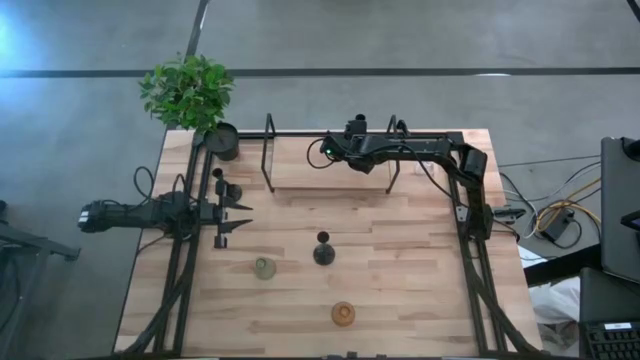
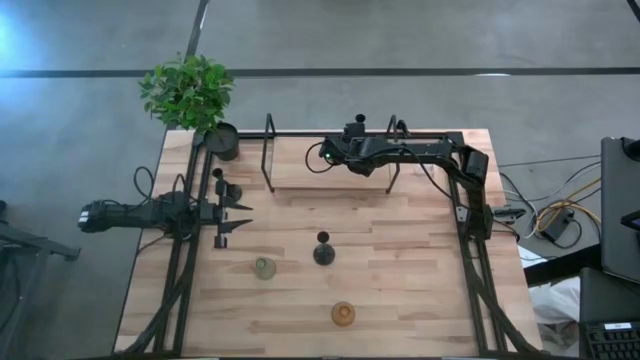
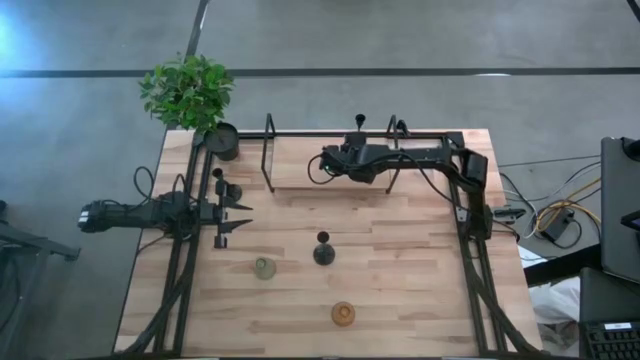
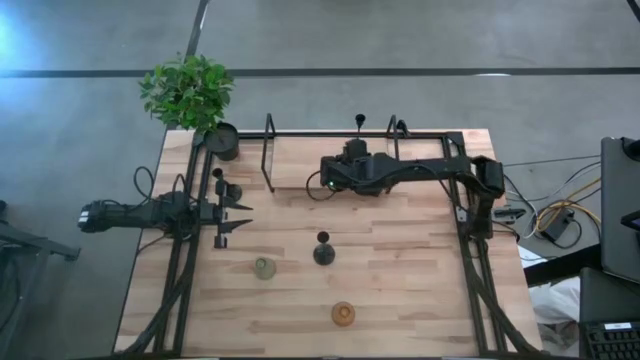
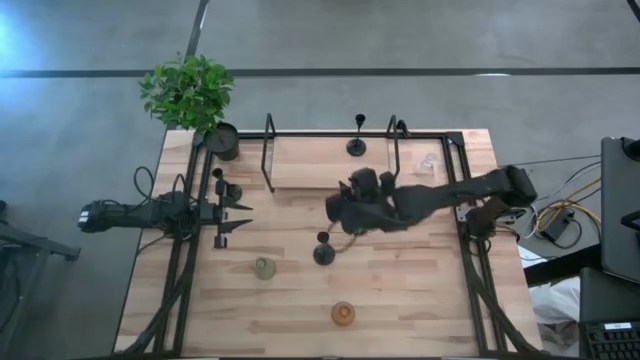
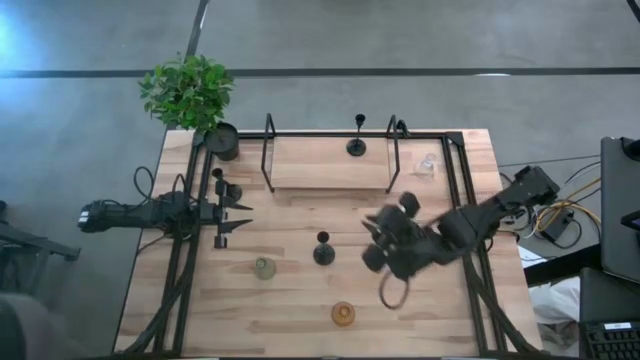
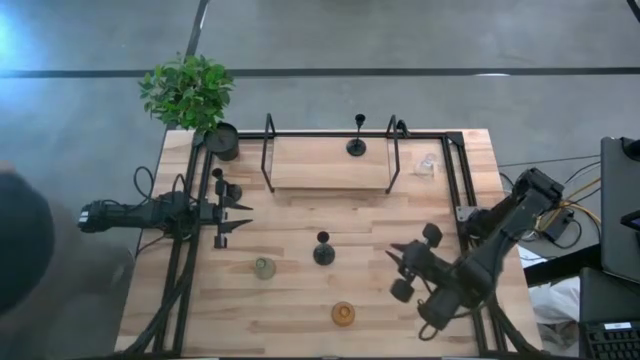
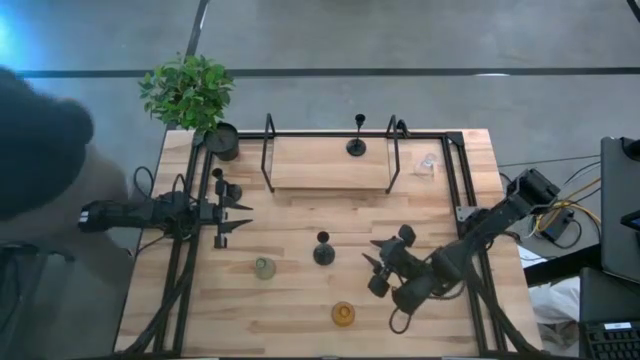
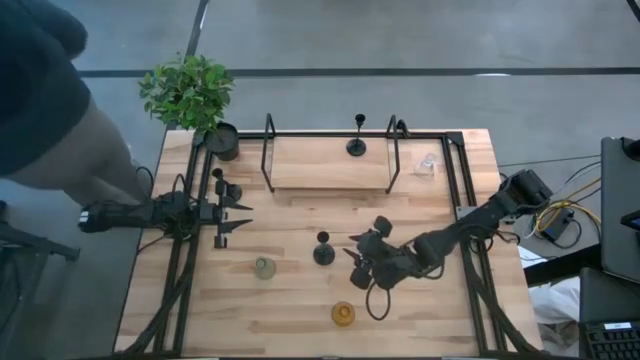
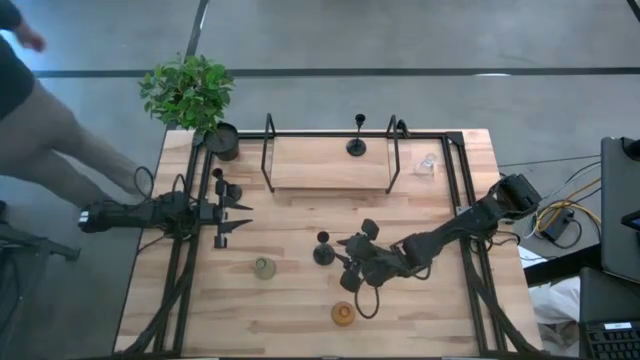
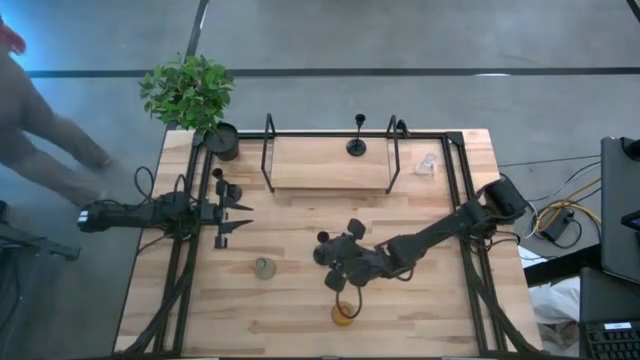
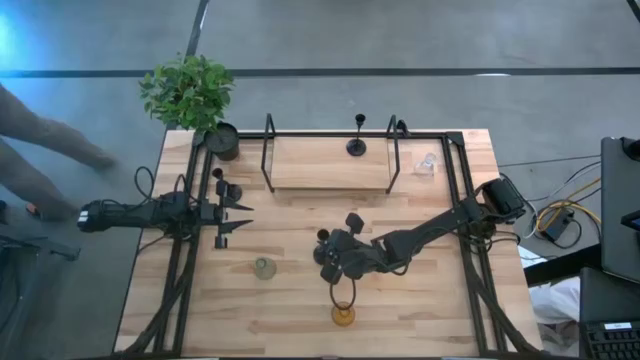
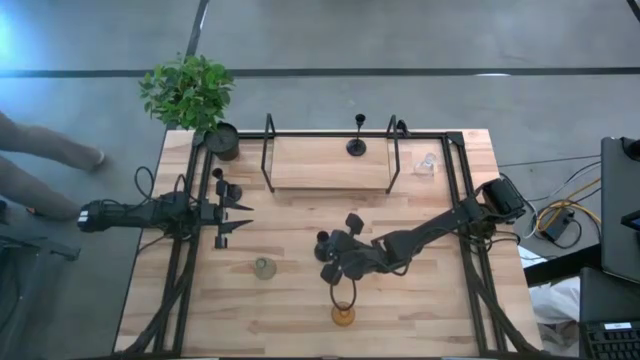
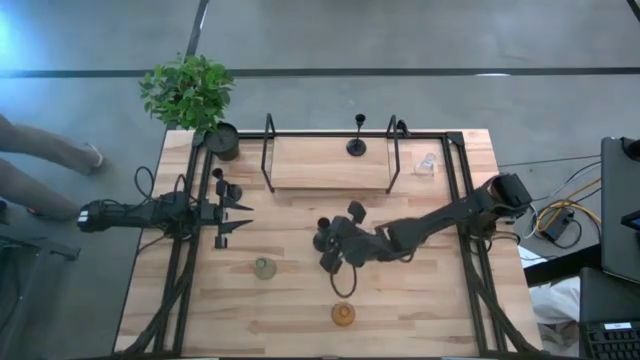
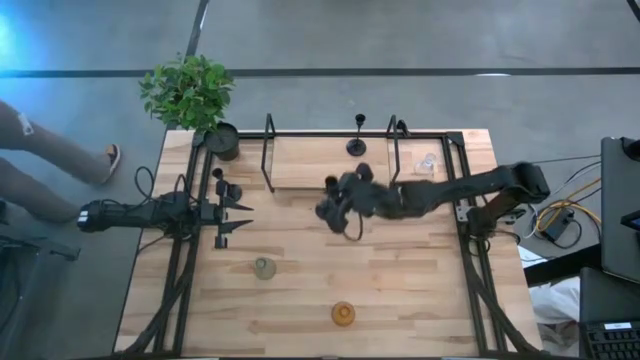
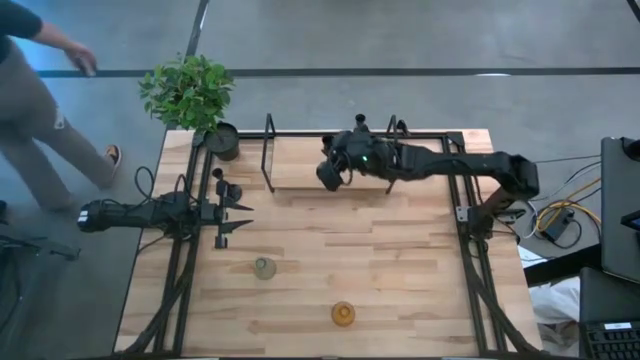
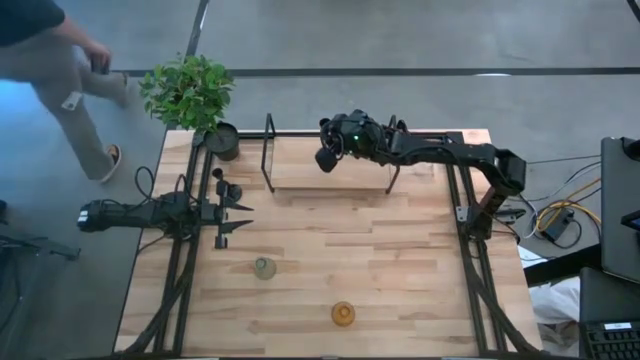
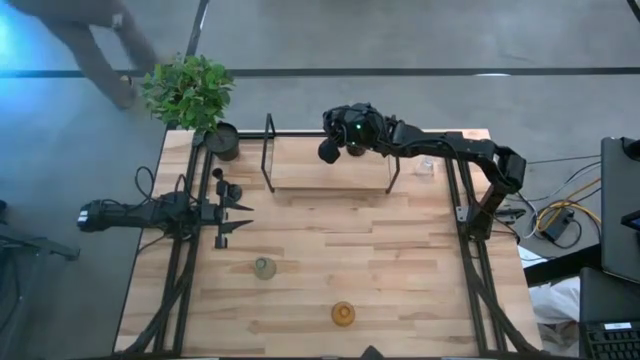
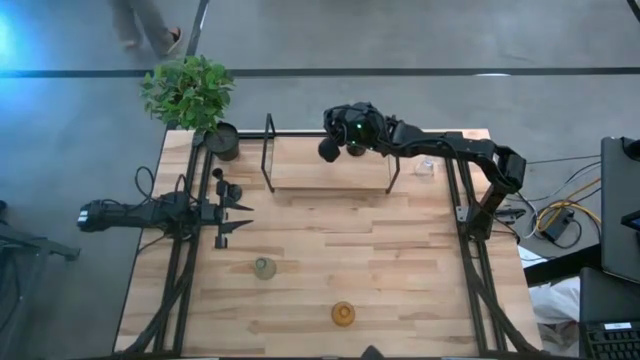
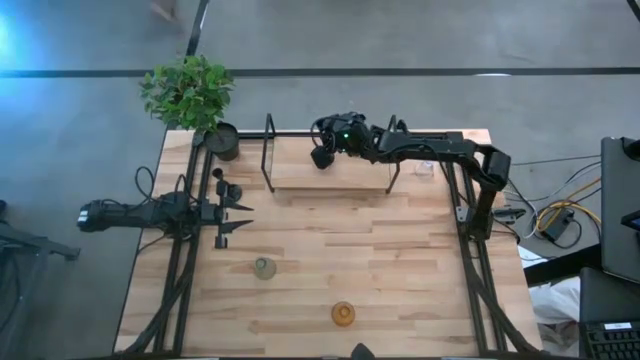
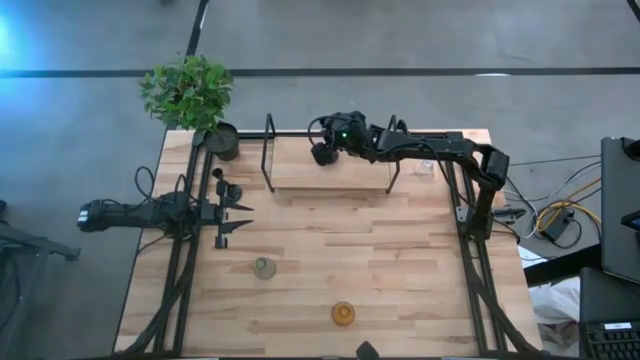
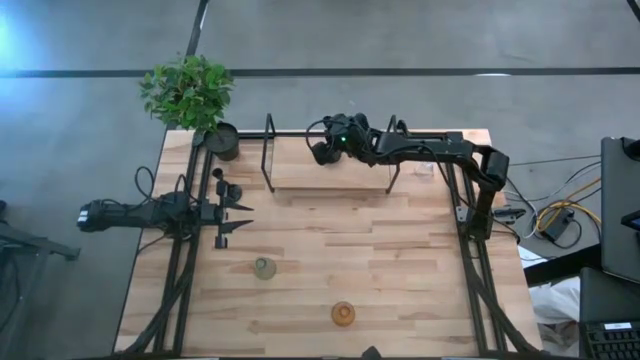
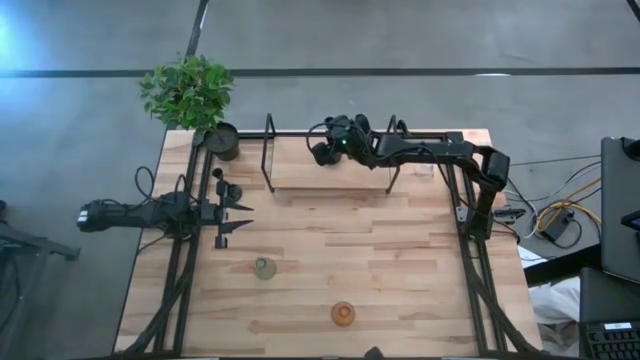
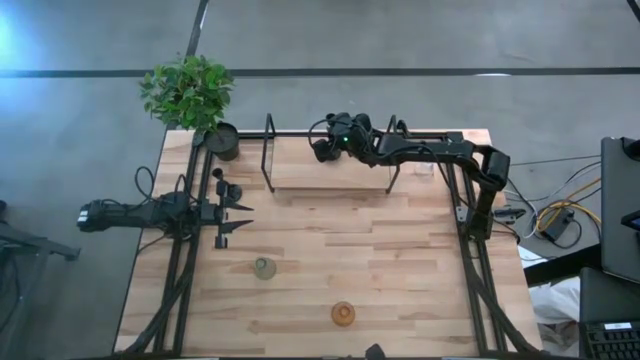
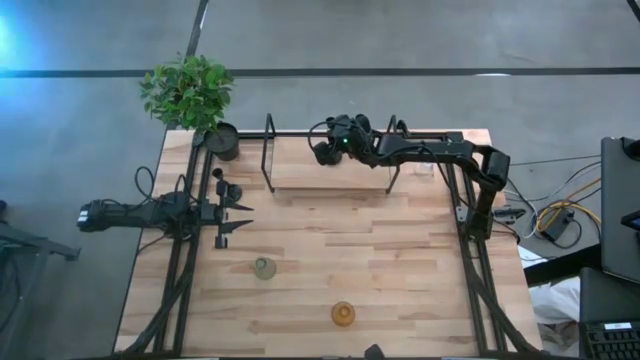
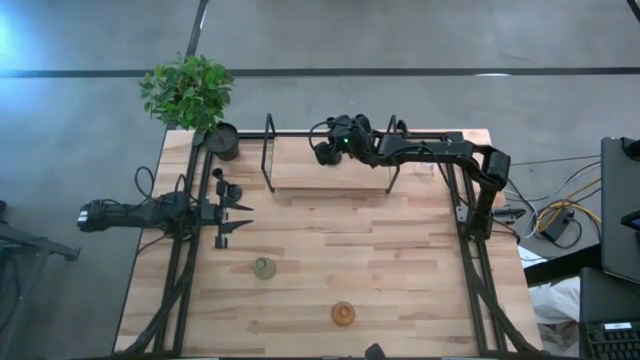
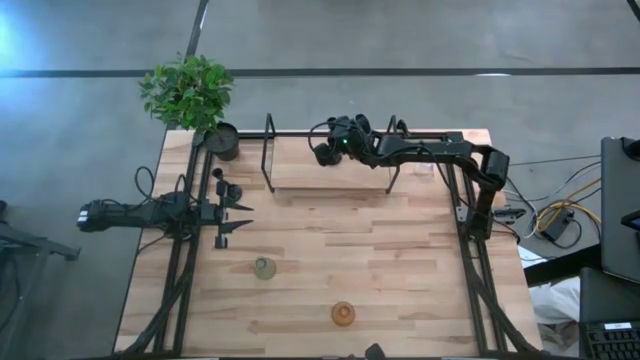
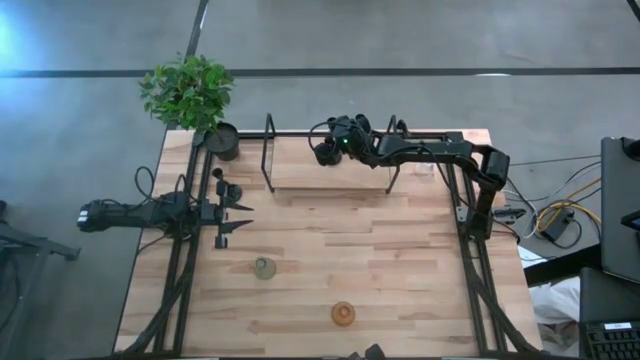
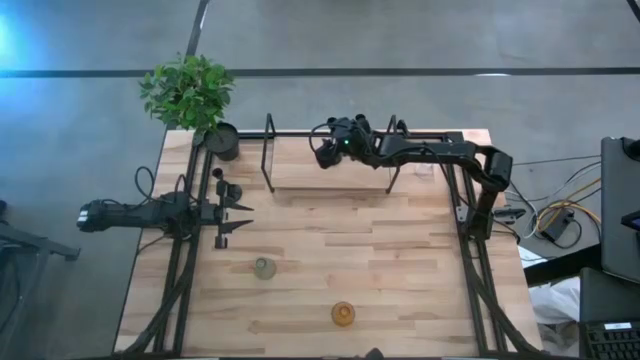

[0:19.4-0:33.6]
Task: Pick & Place candle stick holders
Put the bottom black candle holder on the shelf aligned with the other black candle holder

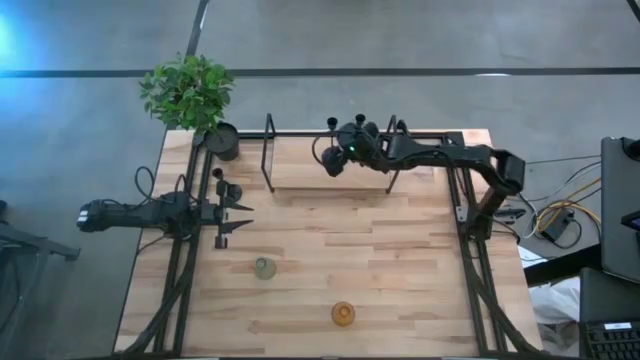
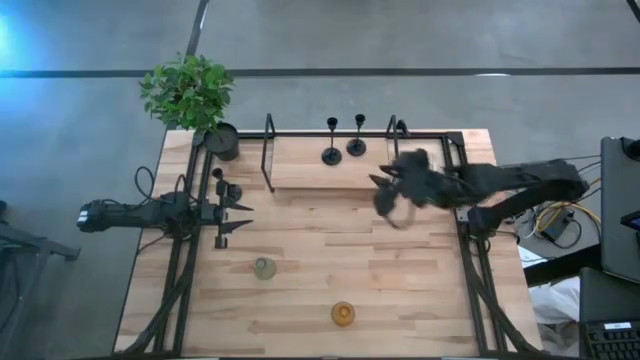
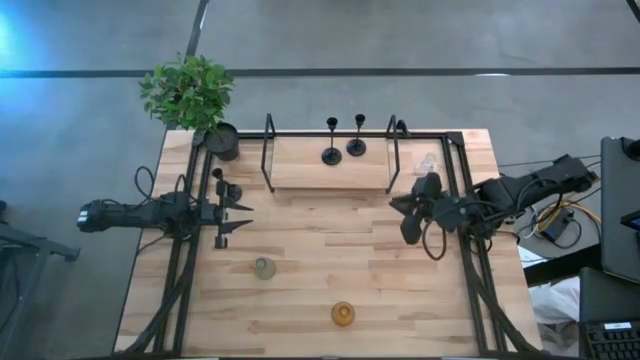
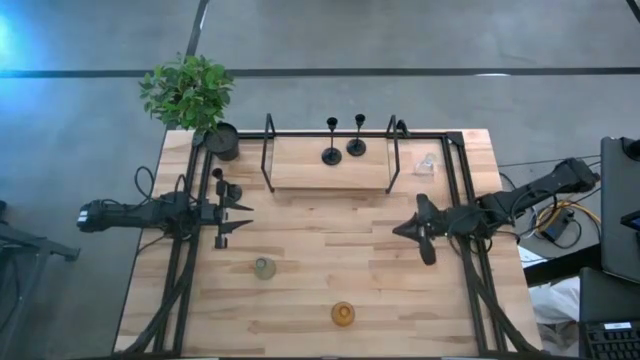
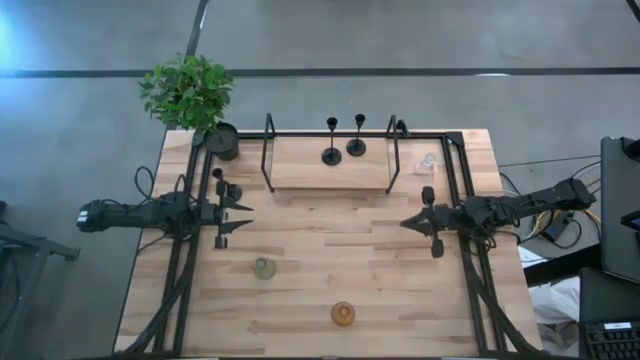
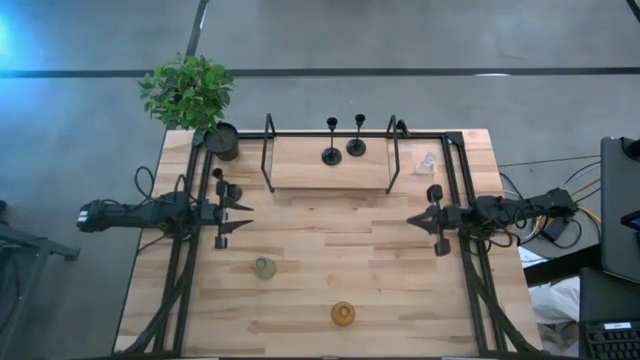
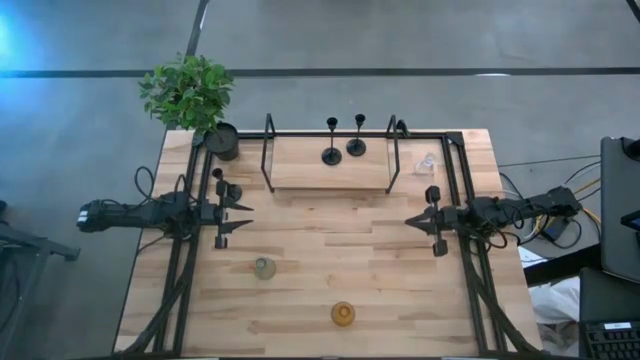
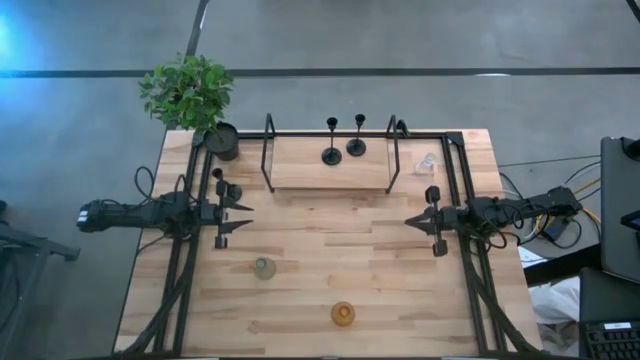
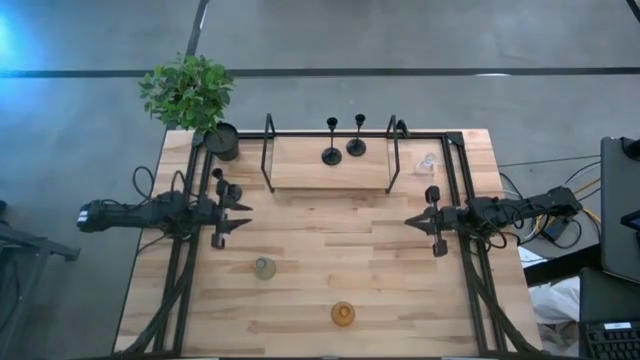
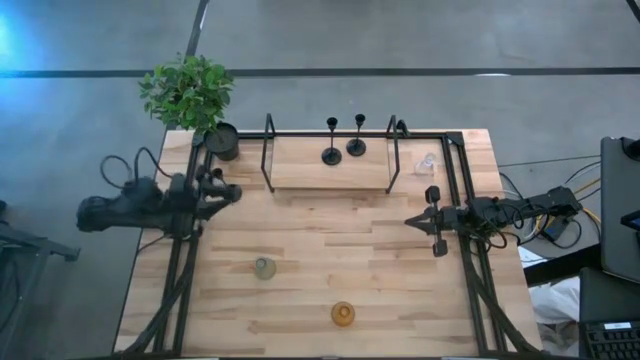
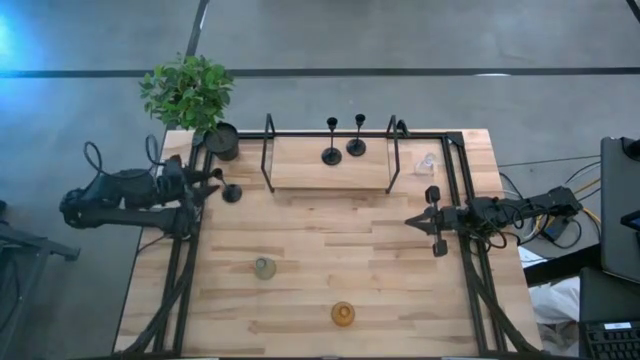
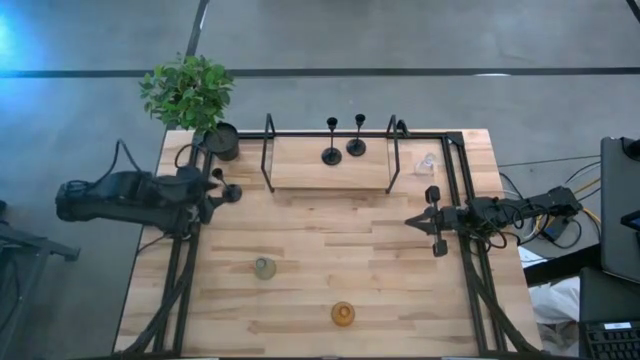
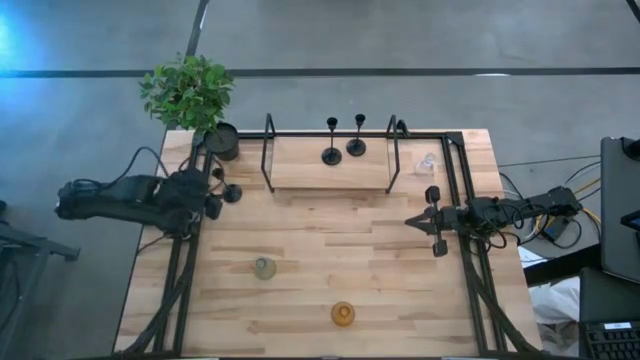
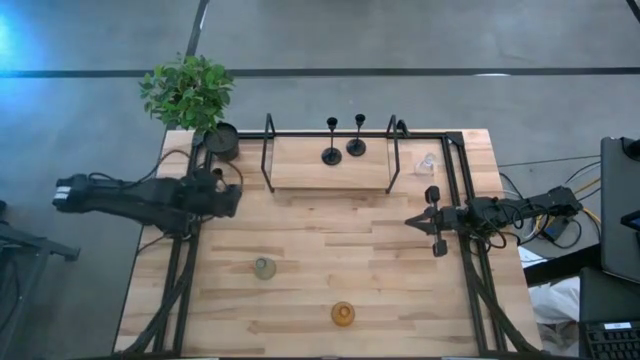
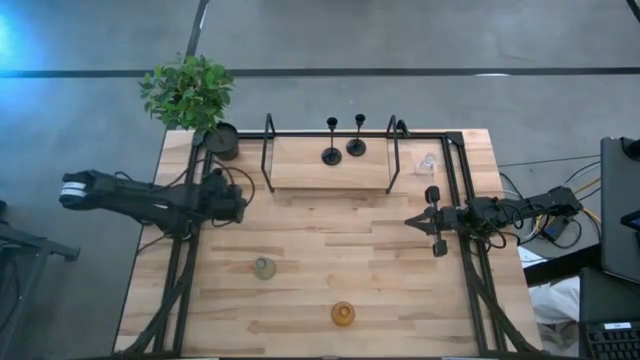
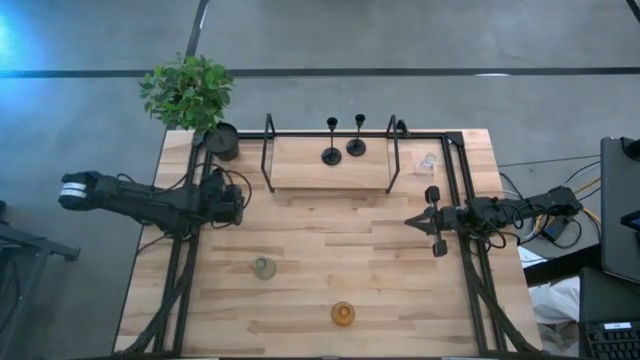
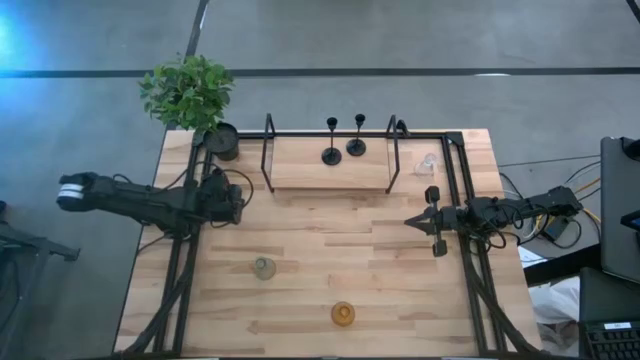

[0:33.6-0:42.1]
Put the black candle holder on the shelf aligned with the other black candle holders
